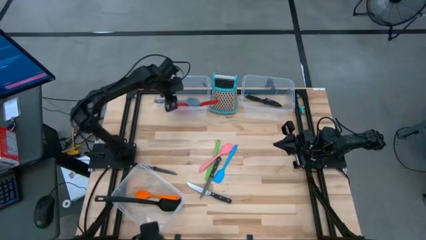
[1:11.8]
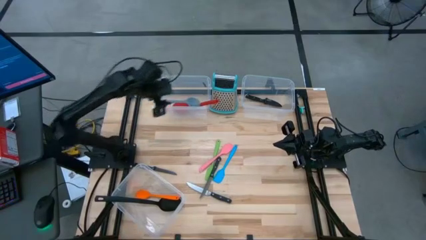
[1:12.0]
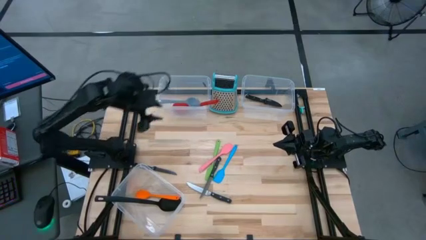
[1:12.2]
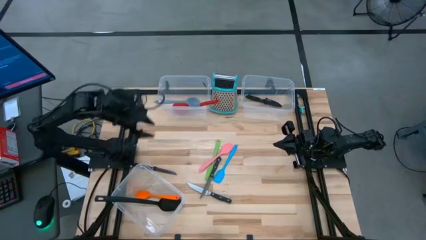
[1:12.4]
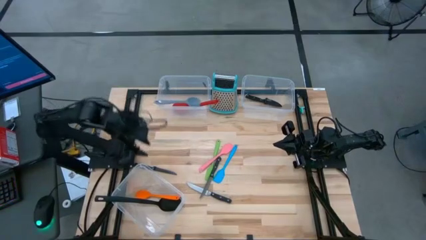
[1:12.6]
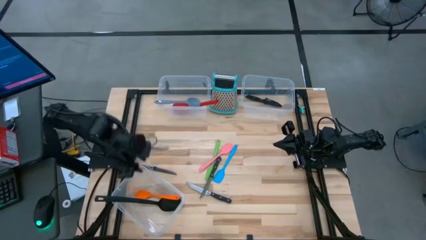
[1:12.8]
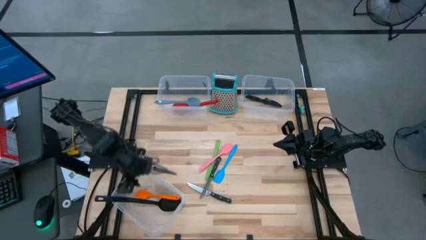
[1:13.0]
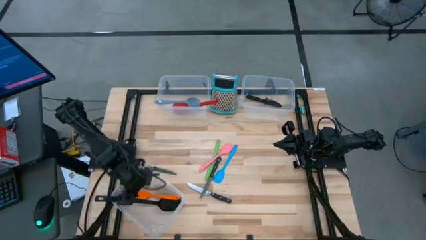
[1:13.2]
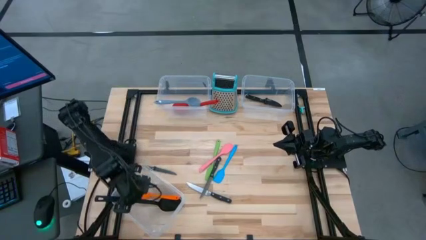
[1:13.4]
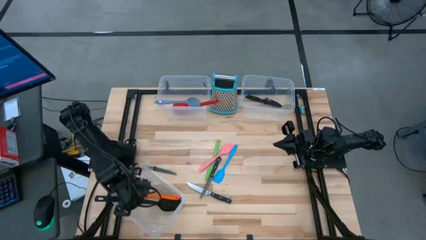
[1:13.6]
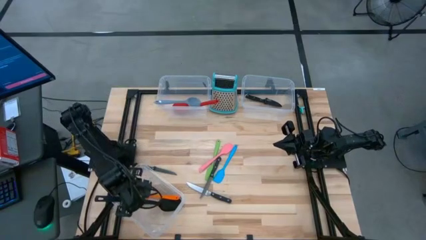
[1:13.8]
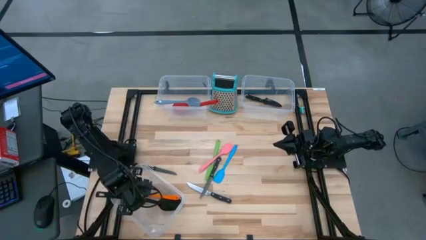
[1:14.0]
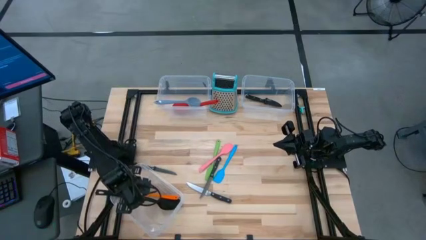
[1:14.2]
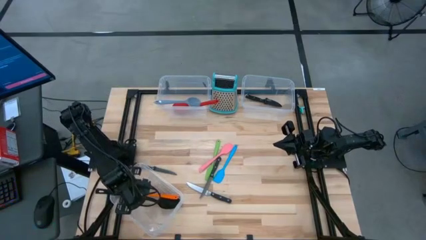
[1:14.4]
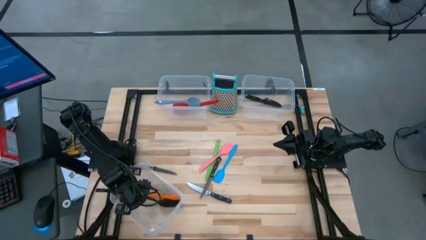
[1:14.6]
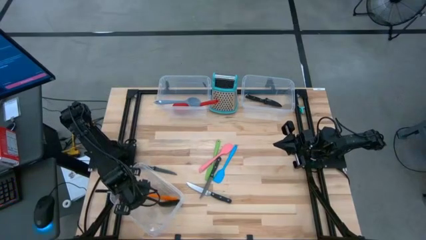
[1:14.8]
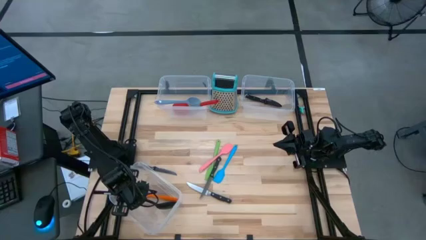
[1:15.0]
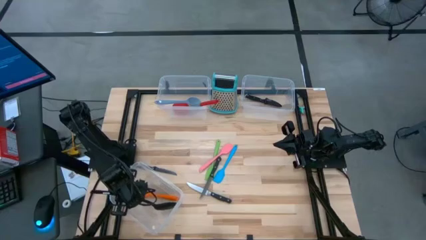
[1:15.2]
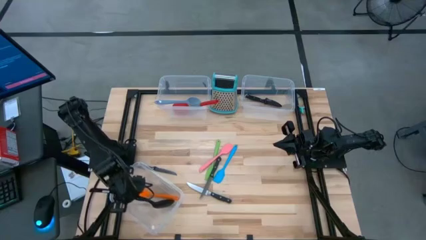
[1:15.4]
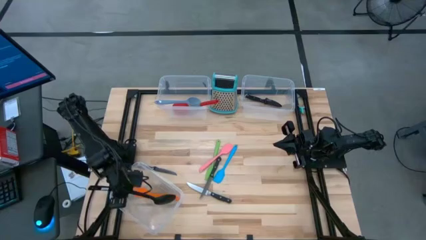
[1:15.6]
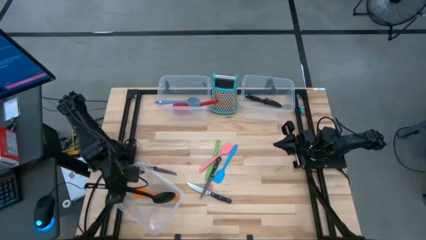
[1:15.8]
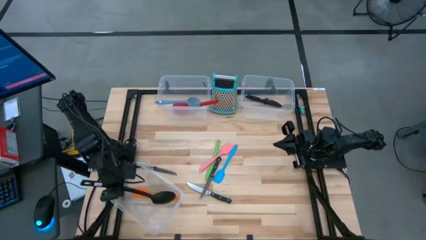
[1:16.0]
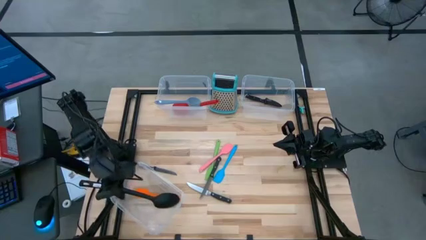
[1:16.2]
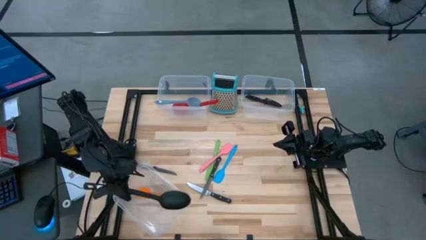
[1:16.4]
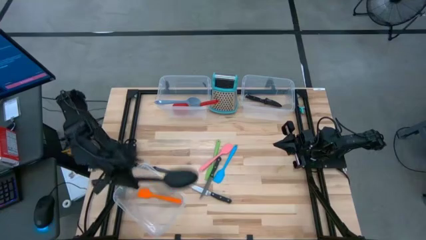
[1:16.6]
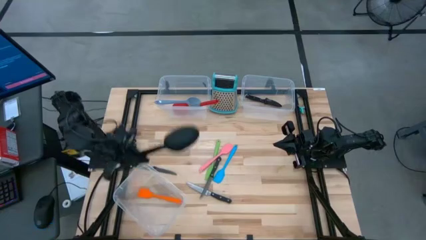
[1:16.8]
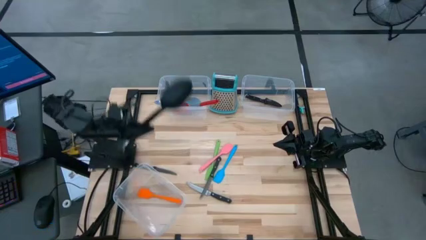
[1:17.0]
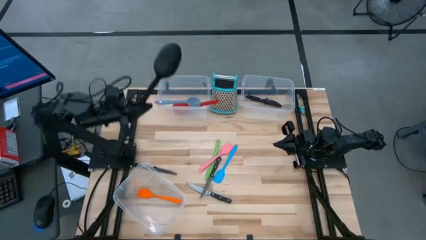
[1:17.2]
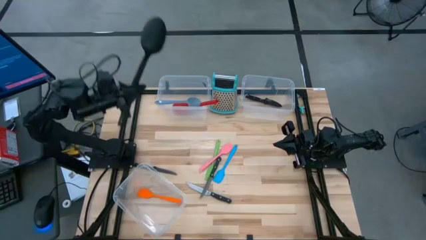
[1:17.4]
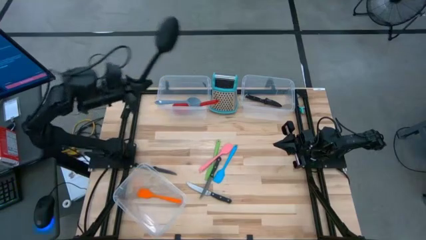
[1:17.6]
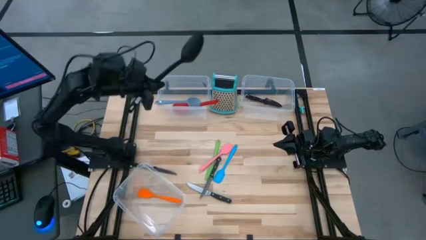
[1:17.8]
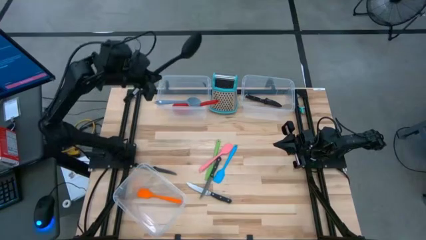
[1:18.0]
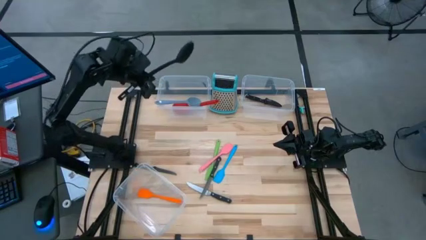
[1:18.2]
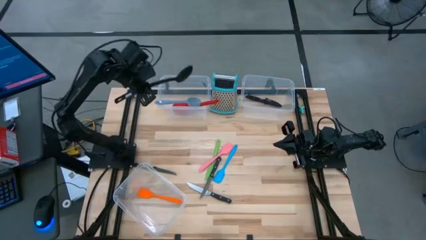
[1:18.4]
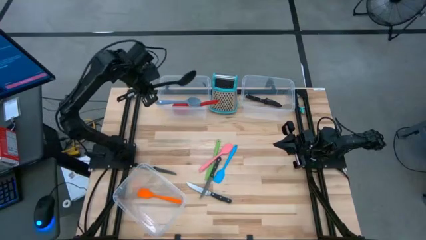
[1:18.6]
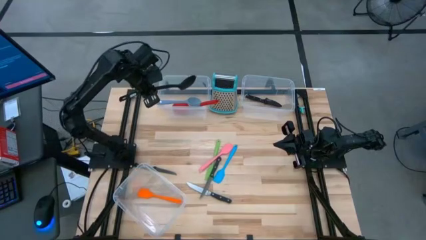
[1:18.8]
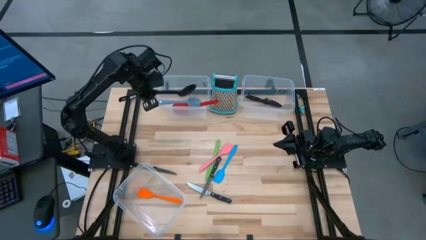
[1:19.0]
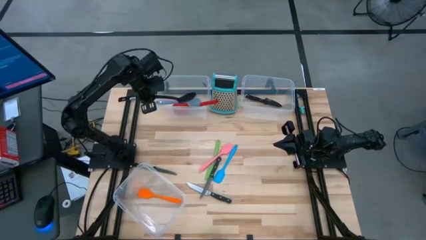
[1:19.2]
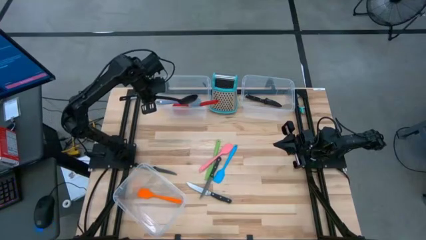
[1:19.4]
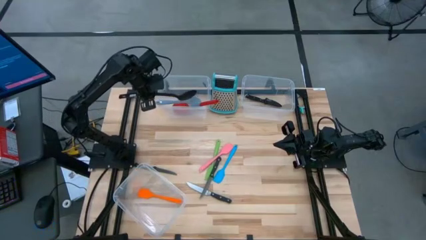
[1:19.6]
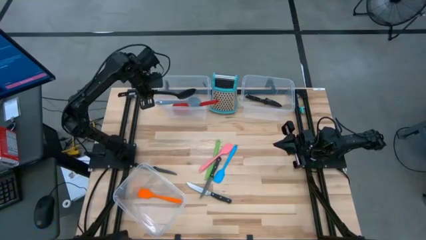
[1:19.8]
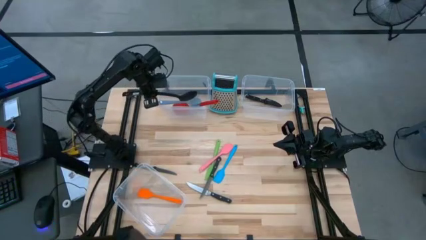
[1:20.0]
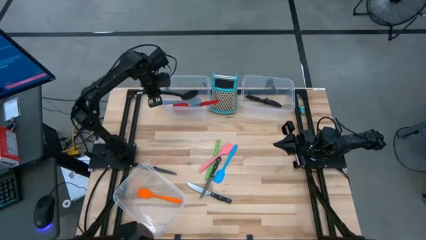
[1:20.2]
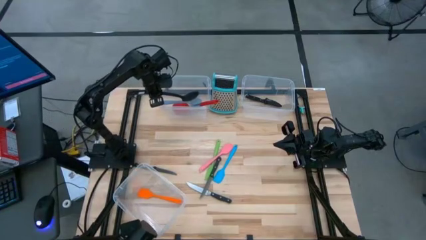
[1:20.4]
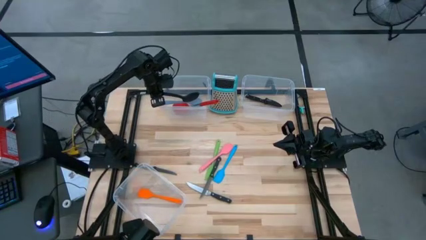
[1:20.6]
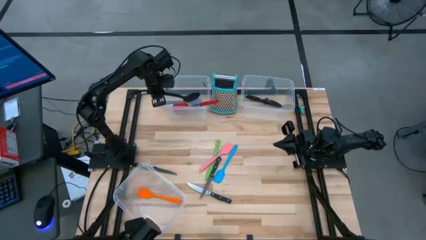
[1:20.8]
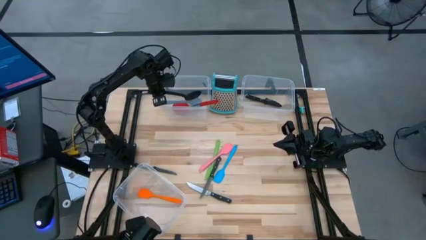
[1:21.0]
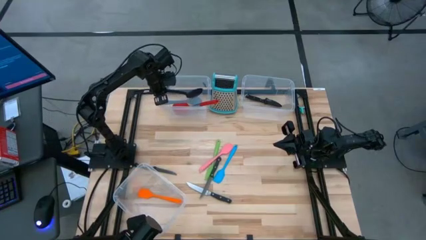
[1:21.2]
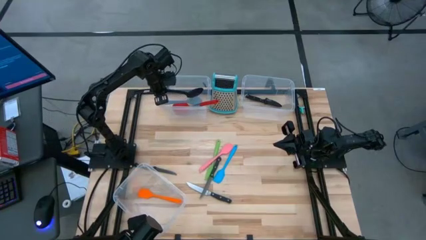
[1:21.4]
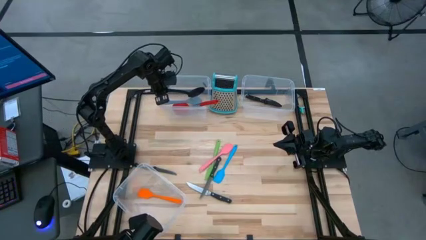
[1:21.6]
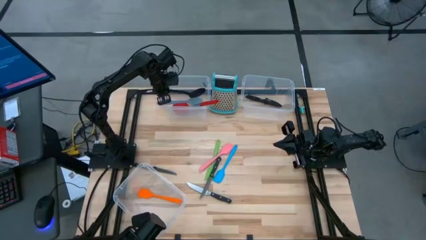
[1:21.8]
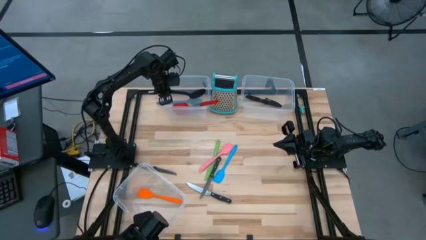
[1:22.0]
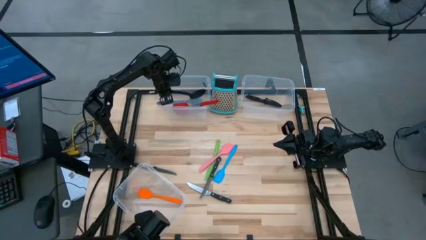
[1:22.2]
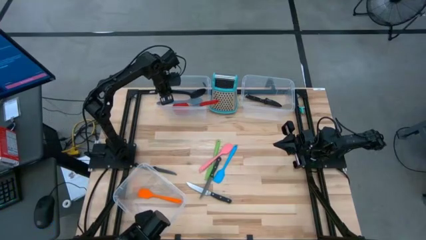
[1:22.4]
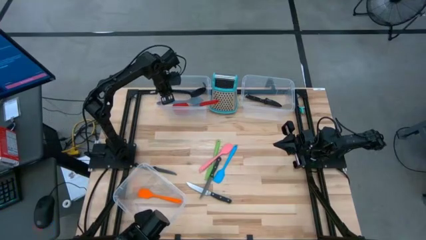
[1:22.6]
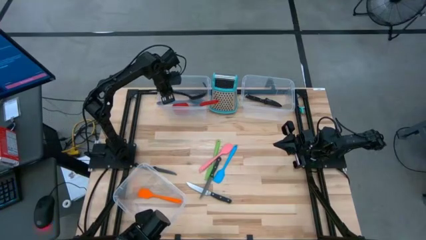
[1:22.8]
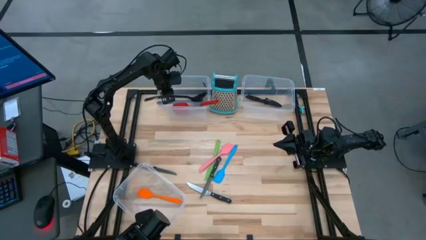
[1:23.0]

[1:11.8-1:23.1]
Task: Pick & Place Kitchen Items
Put the black serving spoon from the bottom transparent bin to the top left transparent bin

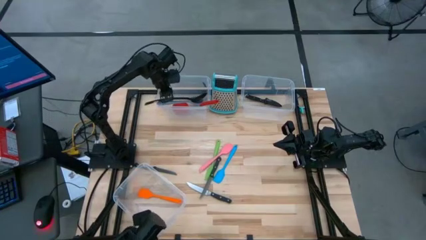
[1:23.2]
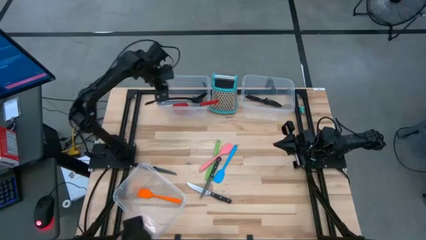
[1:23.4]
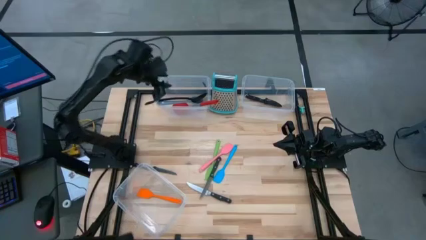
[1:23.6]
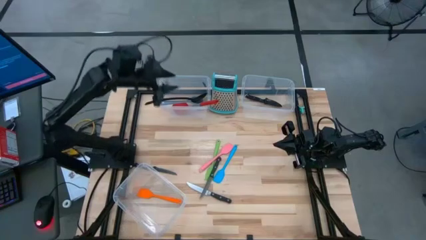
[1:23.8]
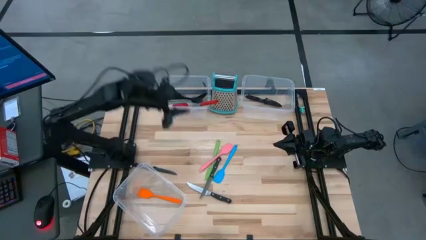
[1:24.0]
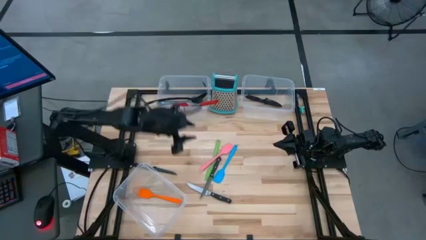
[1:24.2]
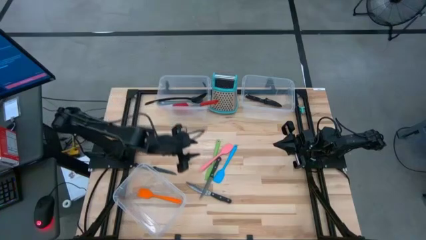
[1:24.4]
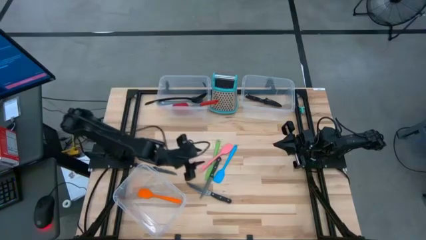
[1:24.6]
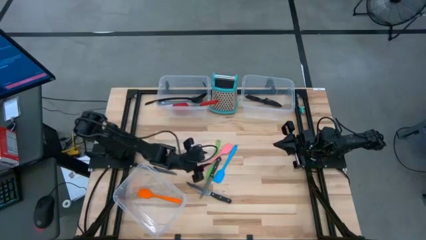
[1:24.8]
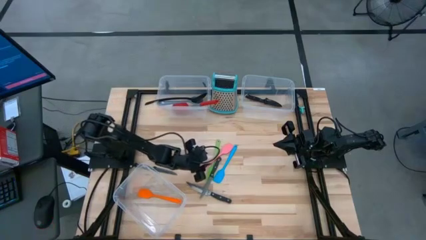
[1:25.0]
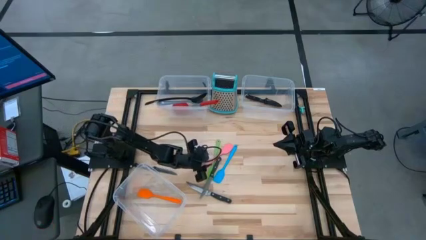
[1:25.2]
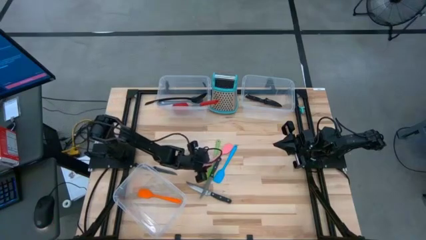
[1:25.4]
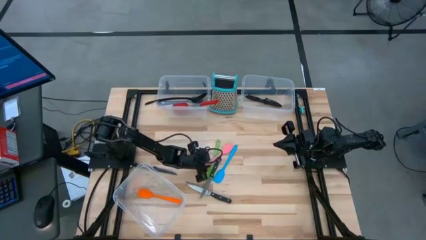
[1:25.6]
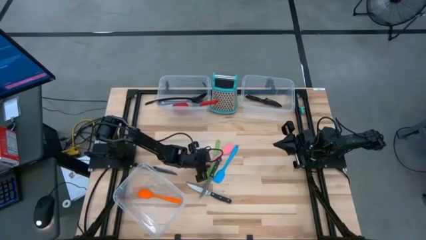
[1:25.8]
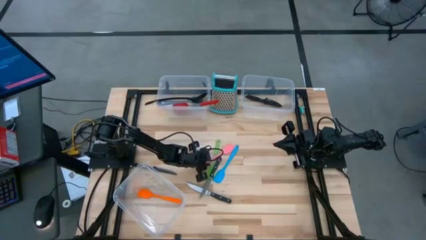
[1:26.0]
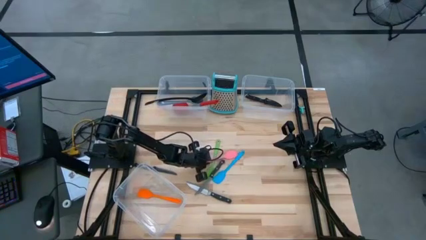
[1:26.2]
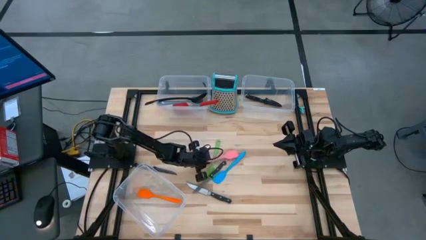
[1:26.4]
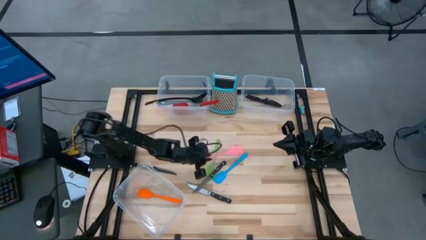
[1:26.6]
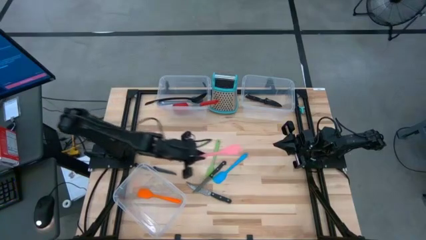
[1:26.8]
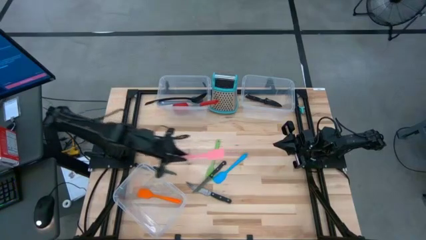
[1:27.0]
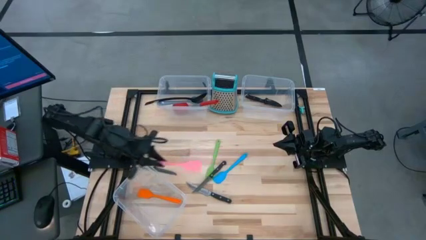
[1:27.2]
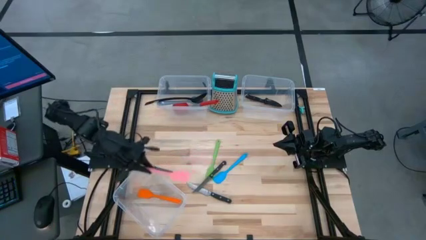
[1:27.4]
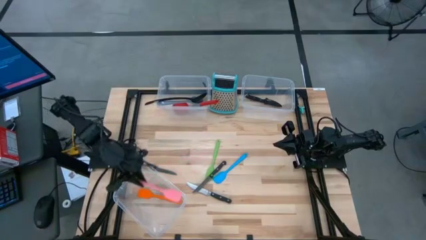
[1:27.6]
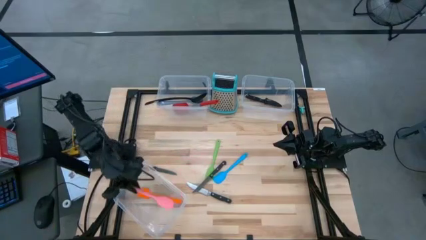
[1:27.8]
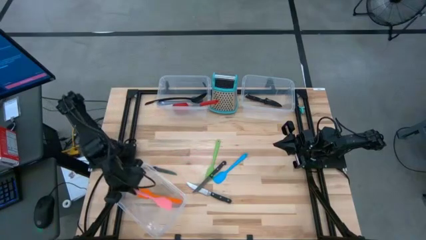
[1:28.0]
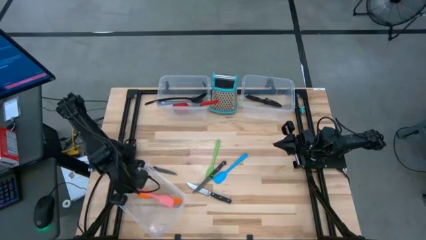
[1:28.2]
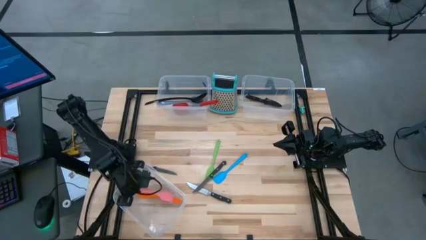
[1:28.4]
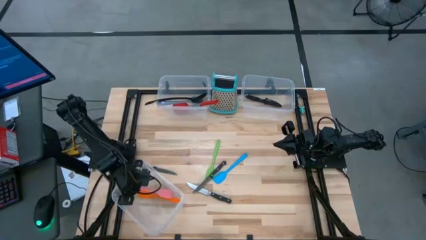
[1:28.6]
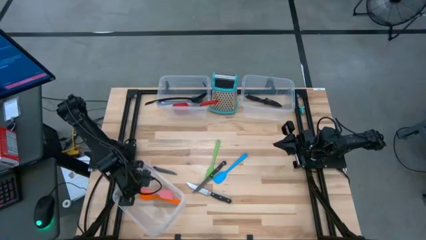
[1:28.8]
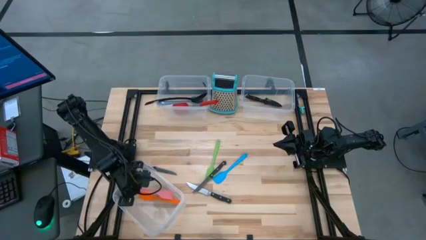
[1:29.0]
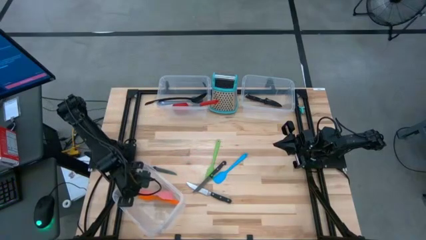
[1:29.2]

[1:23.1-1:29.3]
Put the pink spatula into the bottom transparent bin
